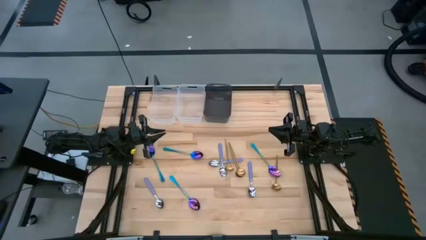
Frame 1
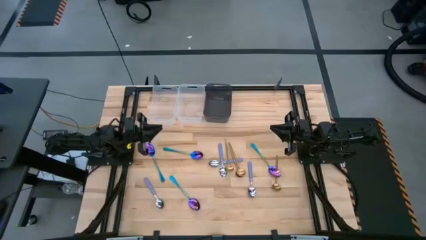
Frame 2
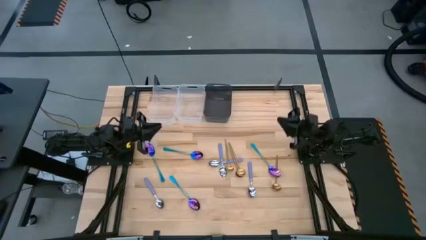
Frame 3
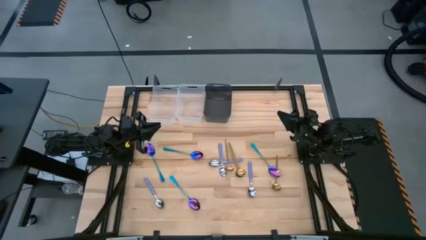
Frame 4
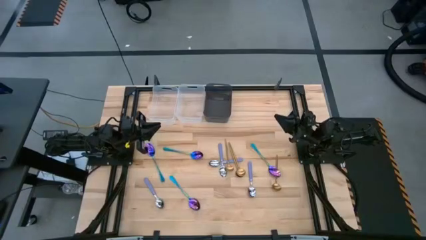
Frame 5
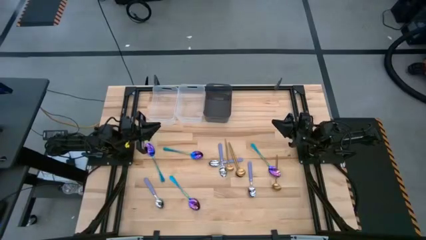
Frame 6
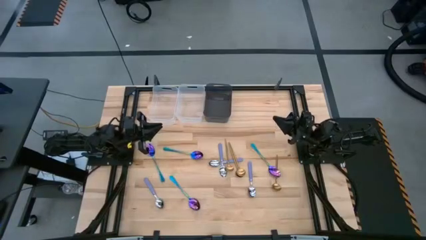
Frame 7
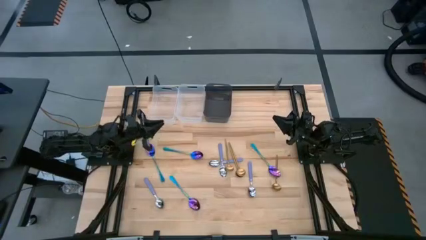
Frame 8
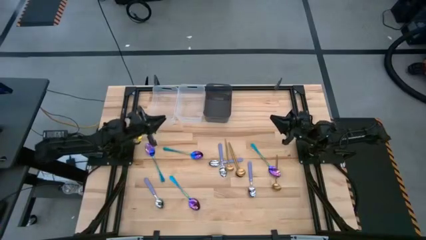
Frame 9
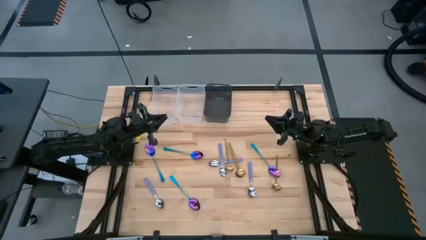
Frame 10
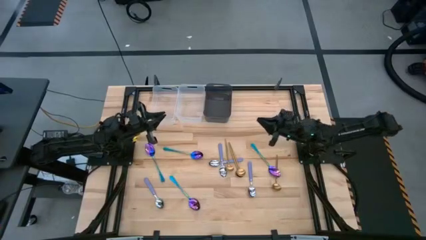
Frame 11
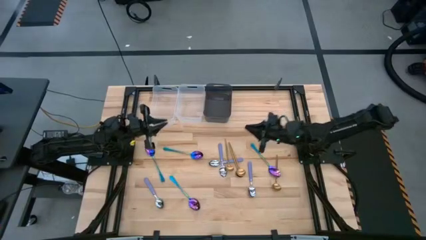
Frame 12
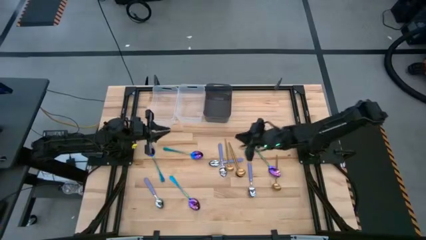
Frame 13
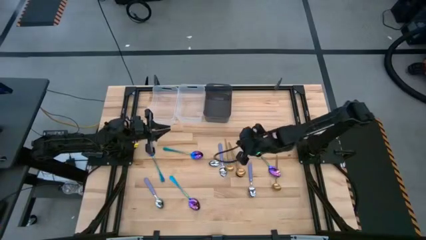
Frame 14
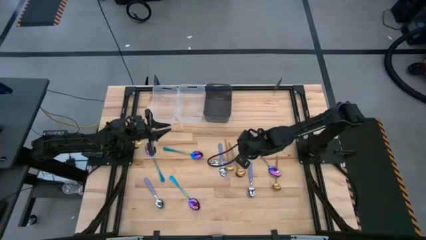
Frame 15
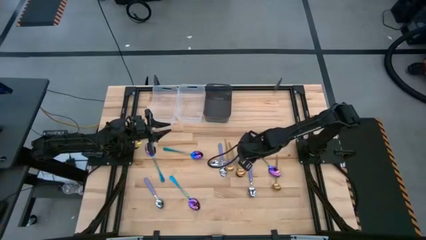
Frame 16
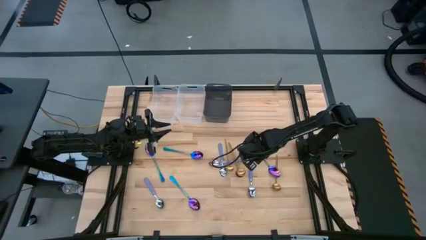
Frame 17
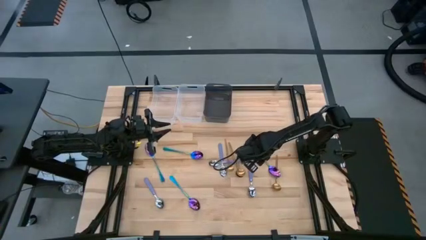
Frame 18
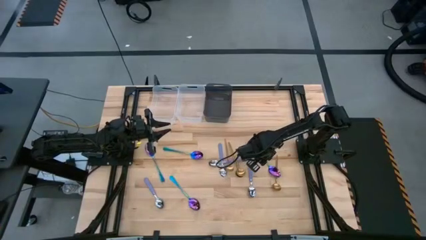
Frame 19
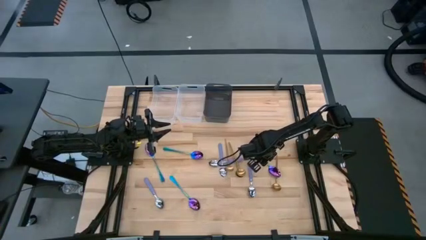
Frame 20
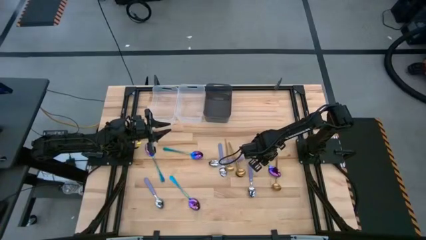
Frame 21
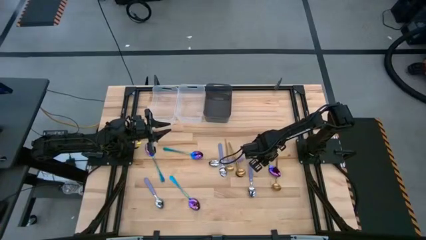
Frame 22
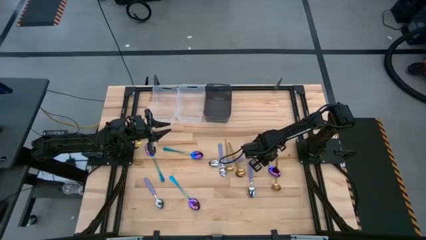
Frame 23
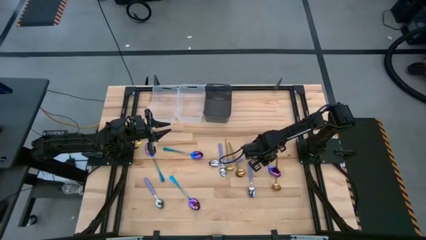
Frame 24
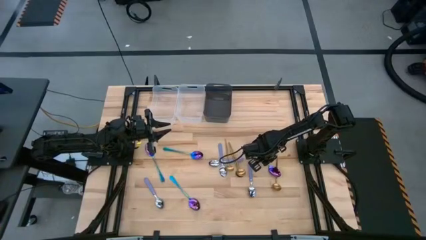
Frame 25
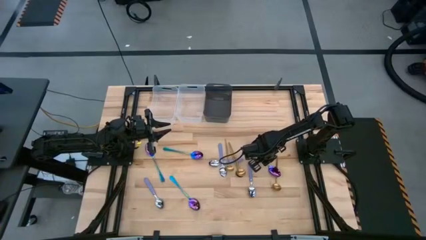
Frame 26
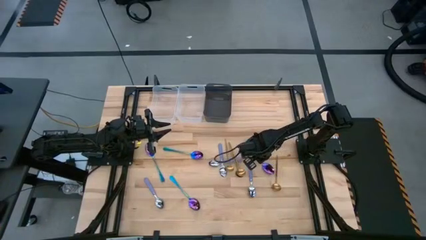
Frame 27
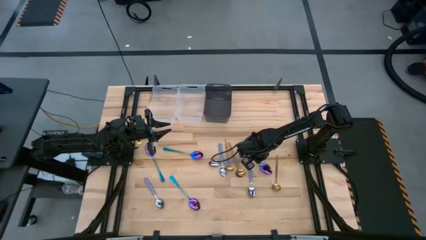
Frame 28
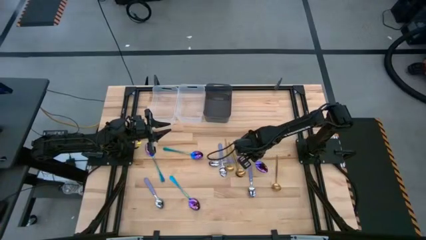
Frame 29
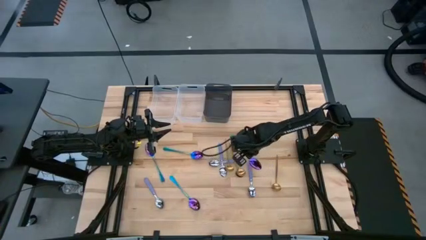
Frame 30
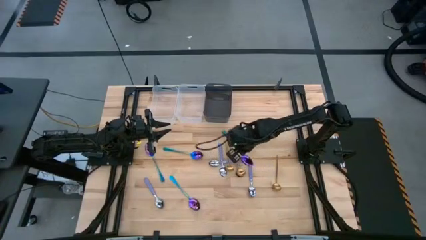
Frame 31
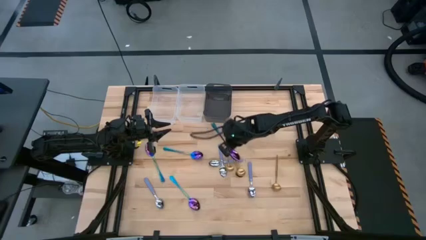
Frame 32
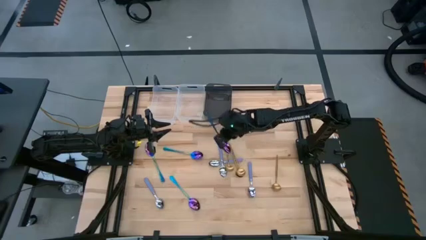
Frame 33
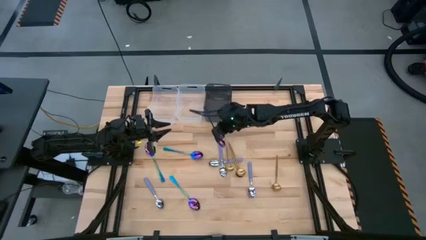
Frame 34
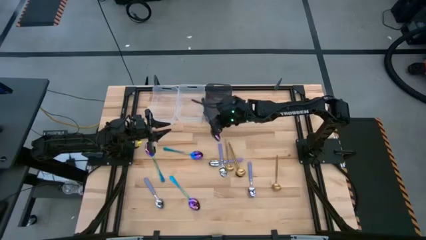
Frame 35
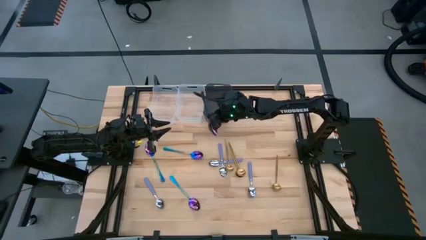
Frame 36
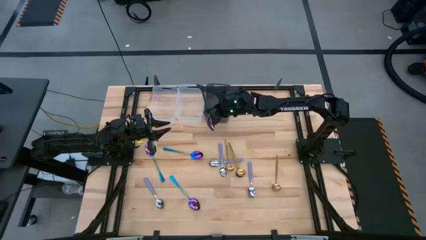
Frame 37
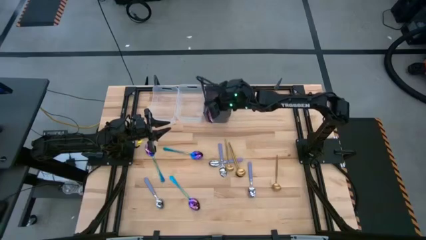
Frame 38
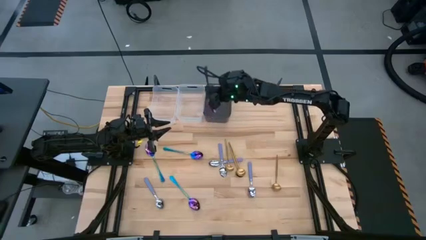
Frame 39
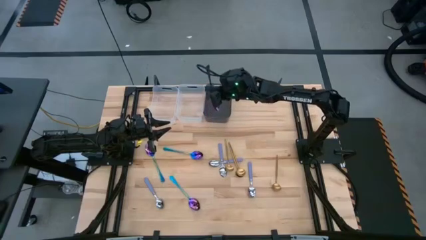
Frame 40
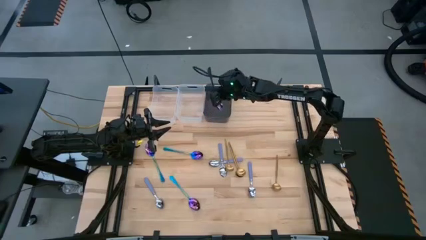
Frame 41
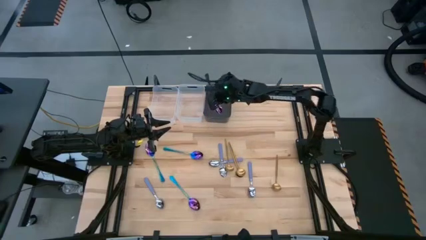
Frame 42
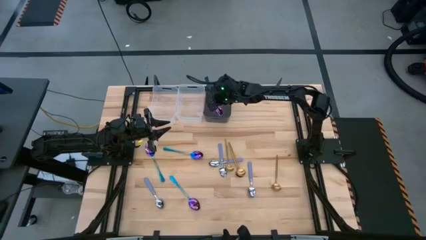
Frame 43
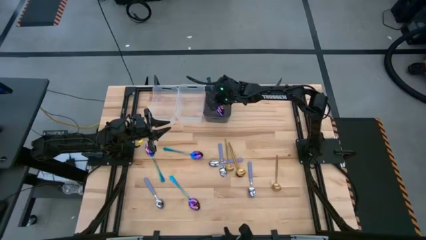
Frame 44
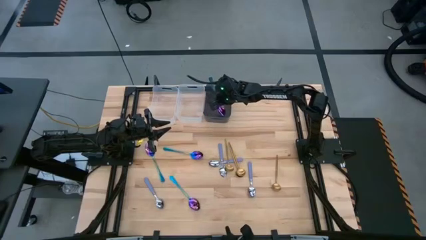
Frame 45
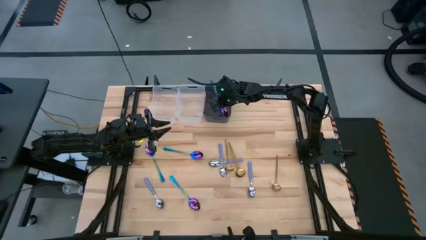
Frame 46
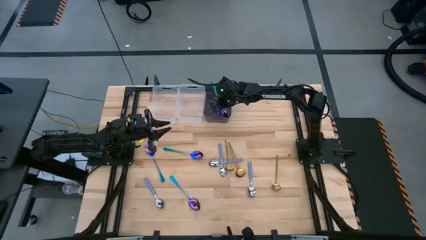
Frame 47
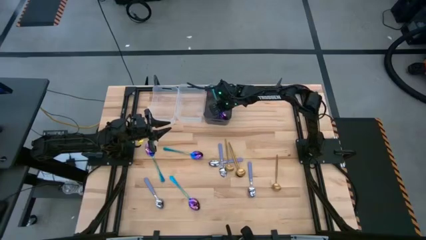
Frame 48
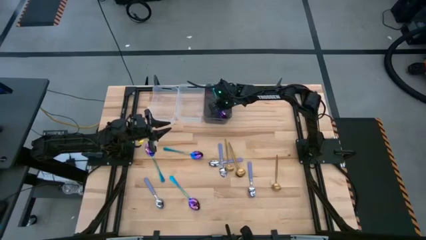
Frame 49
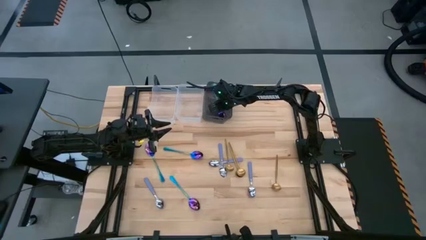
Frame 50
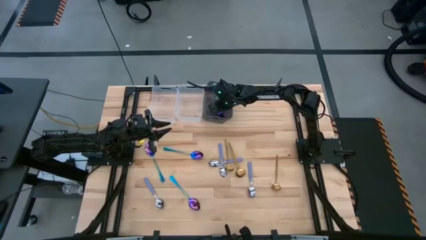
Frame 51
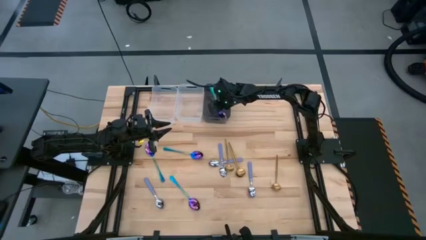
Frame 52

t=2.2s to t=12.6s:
Task: Sort silverware by color (type)
Put the iridescent spoon into the black bin

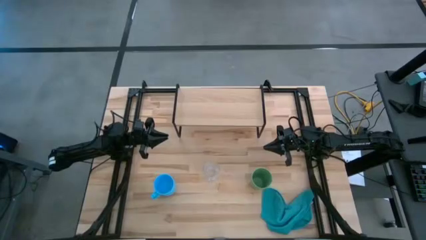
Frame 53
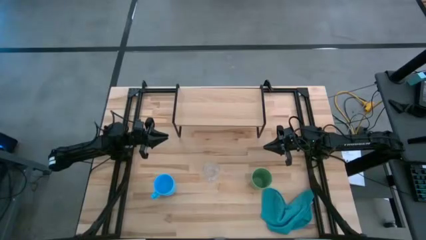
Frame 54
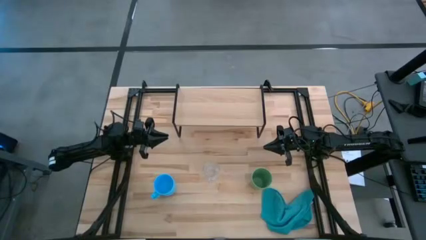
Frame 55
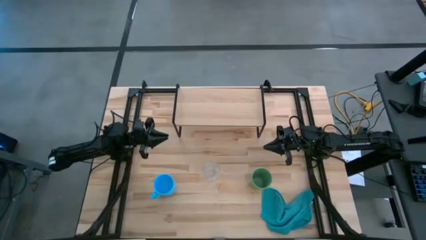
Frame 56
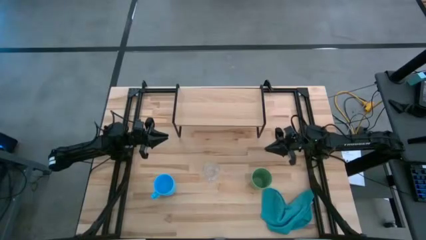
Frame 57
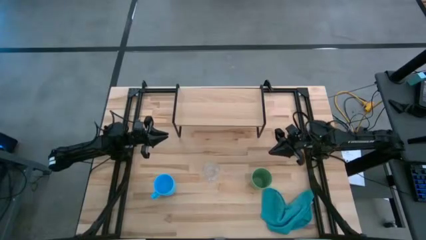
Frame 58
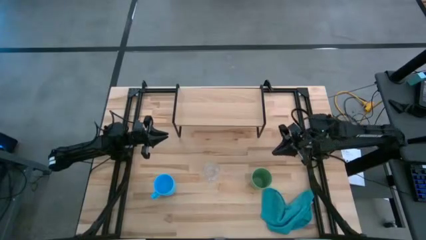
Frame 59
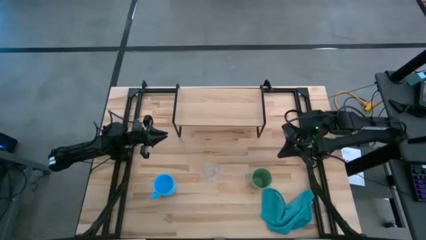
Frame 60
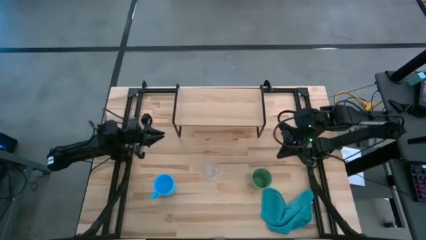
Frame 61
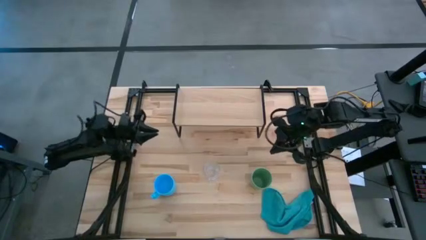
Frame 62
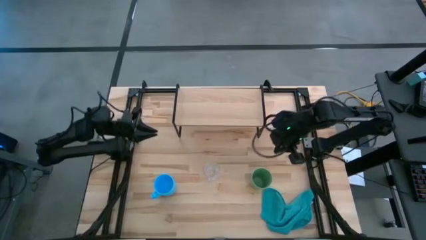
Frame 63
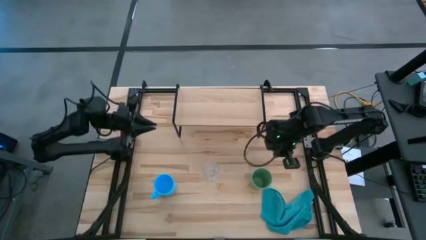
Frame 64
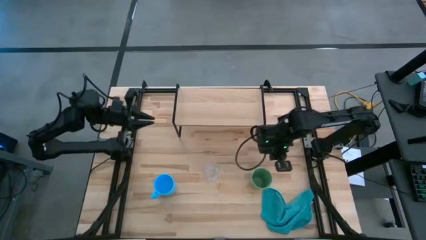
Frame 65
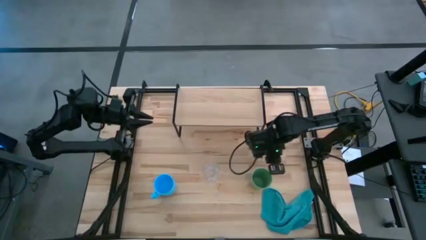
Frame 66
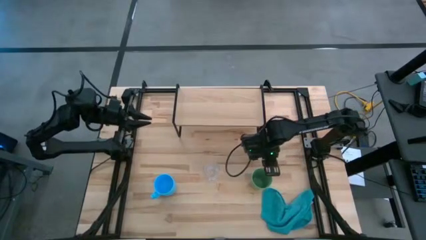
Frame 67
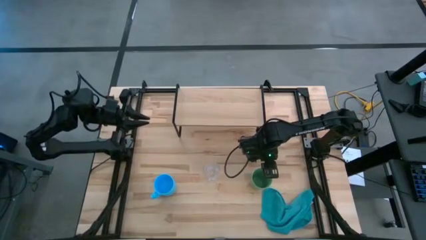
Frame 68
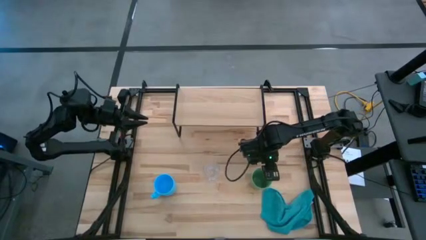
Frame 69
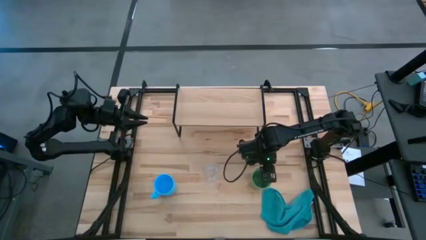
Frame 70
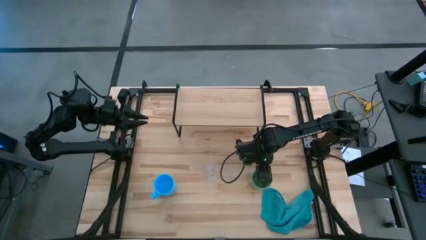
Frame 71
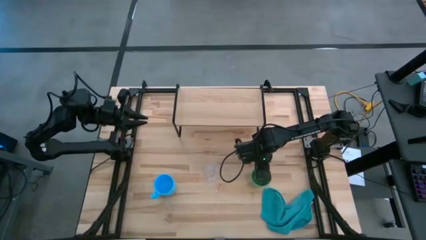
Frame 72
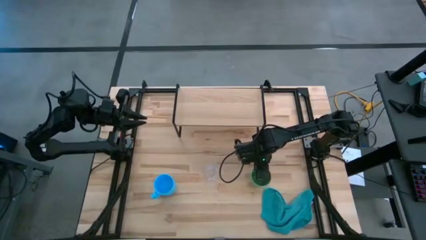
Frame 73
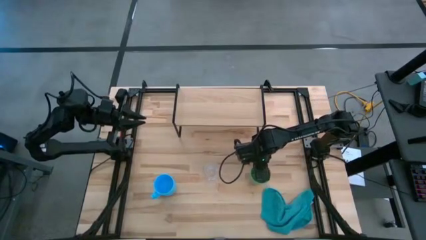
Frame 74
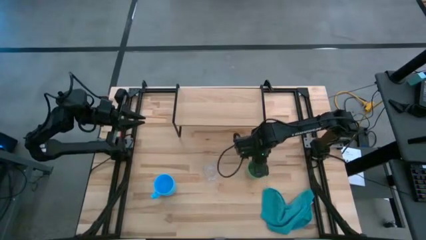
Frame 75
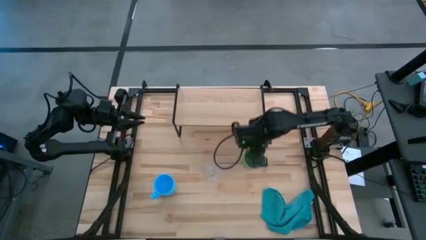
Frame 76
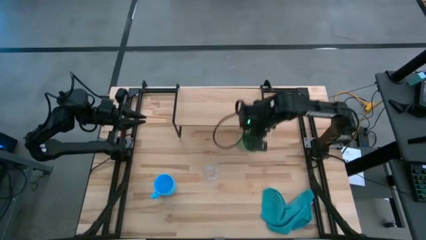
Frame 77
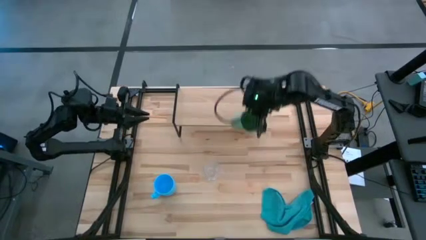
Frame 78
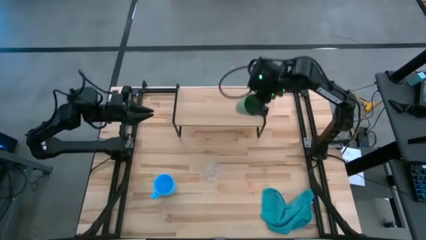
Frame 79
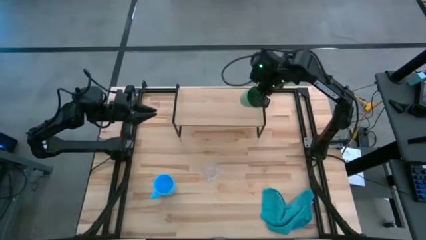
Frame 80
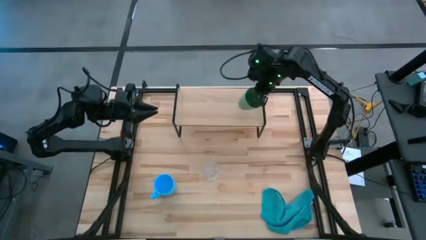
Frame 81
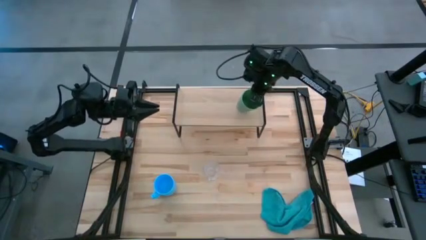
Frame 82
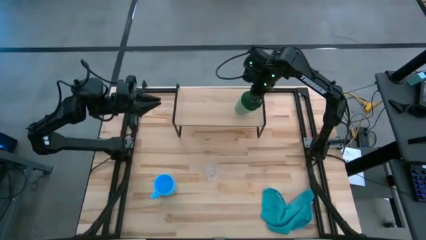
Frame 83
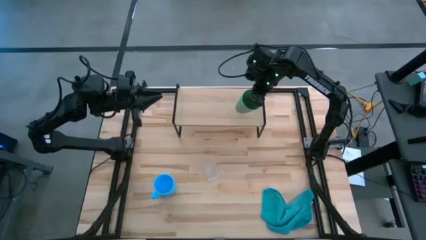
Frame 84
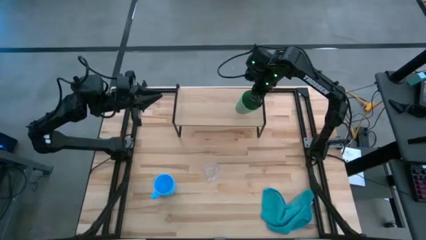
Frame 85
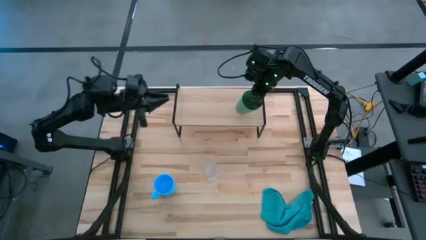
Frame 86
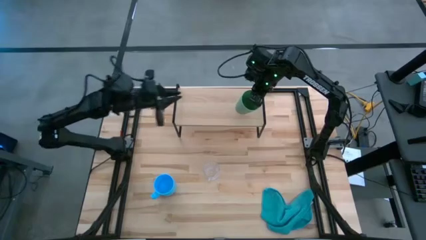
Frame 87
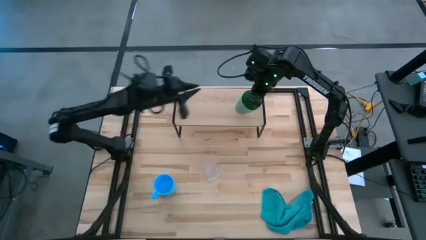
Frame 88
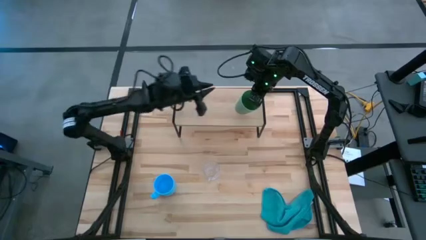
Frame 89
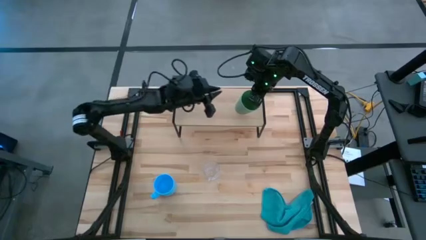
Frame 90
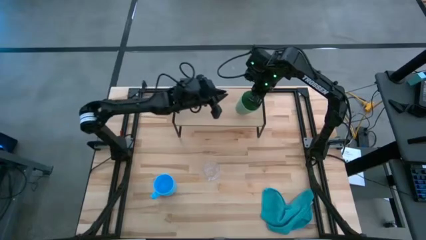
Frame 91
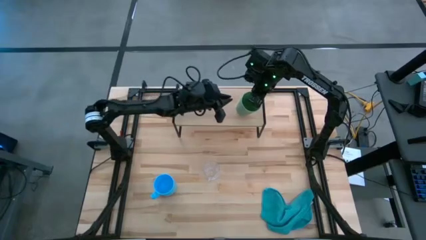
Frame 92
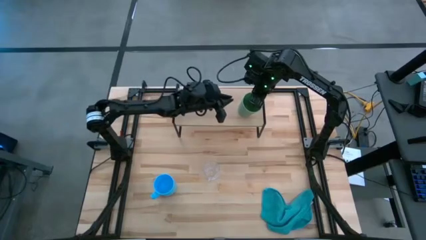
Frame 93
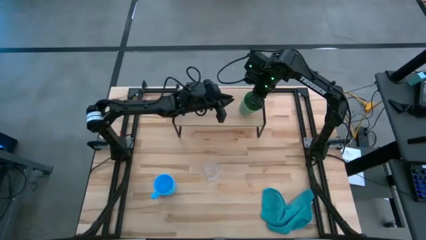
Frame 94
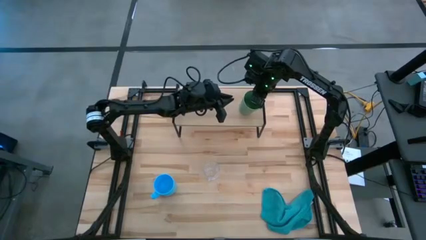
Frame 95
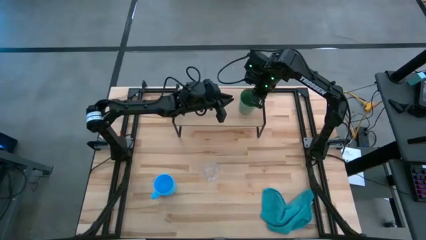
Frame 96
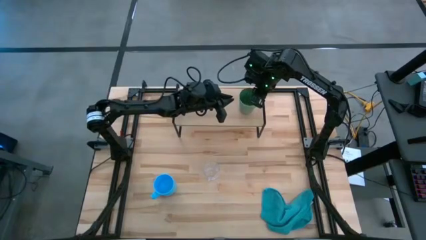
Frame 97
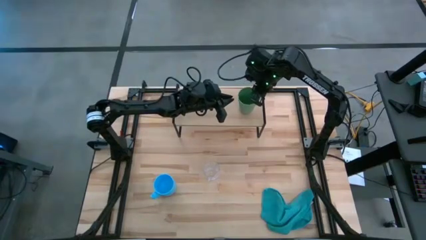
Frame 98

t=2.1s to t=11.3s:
Task: Stack small to large cups/mugs on shelf
Put the green cup on the shelf
